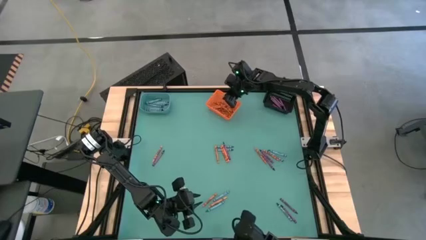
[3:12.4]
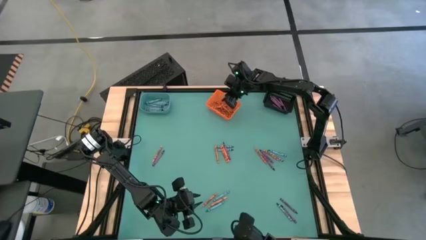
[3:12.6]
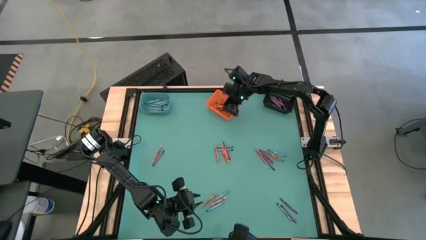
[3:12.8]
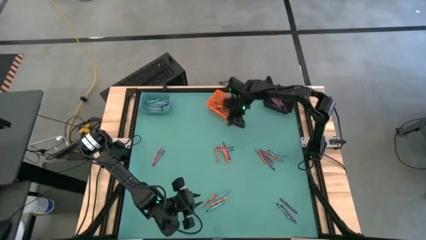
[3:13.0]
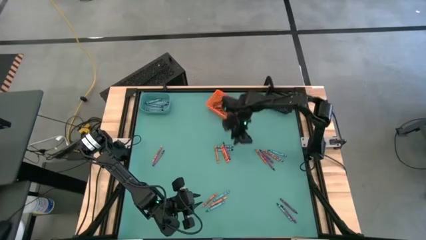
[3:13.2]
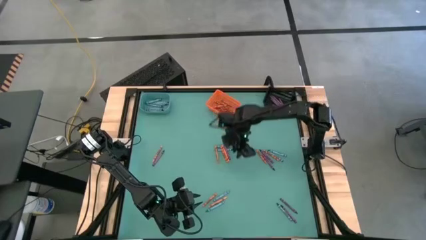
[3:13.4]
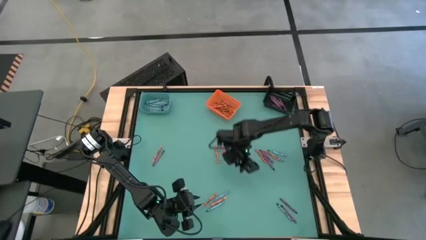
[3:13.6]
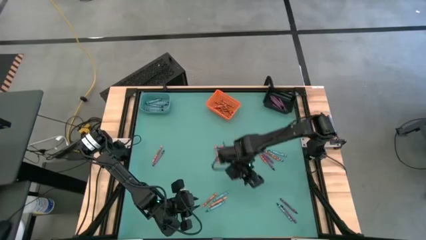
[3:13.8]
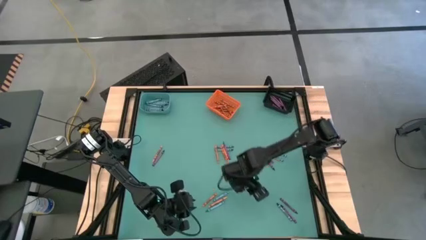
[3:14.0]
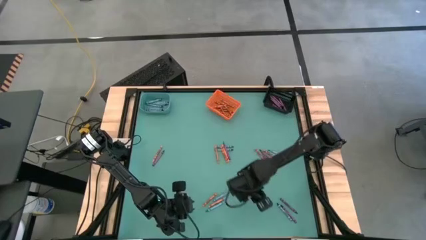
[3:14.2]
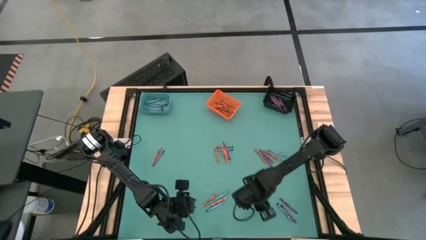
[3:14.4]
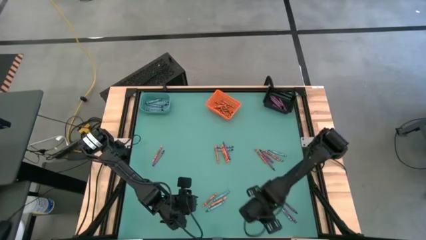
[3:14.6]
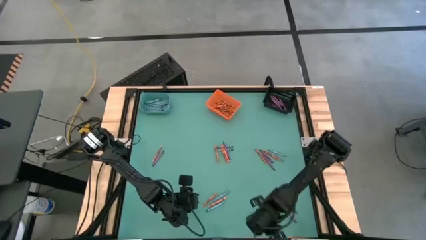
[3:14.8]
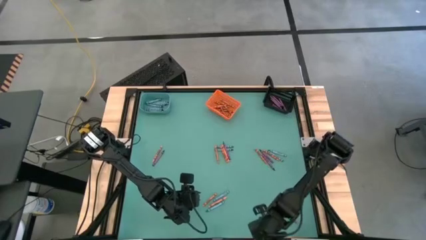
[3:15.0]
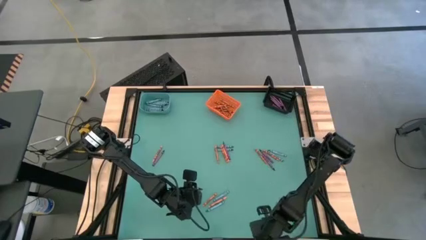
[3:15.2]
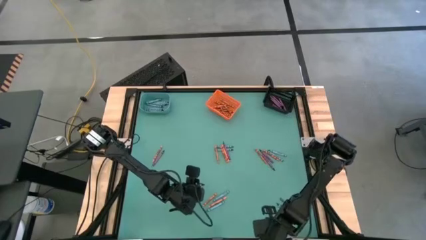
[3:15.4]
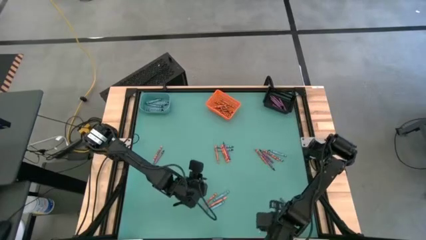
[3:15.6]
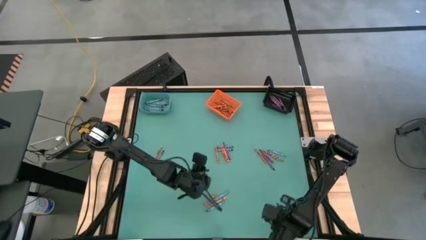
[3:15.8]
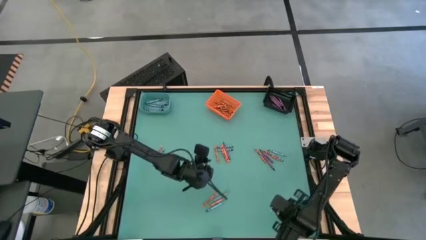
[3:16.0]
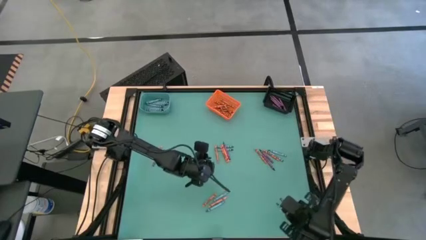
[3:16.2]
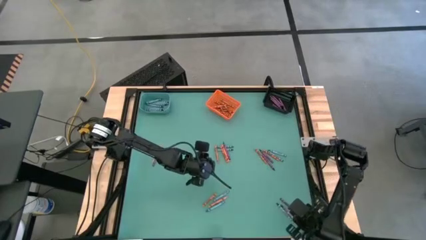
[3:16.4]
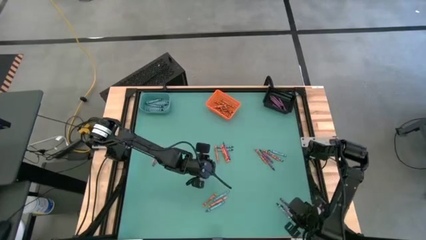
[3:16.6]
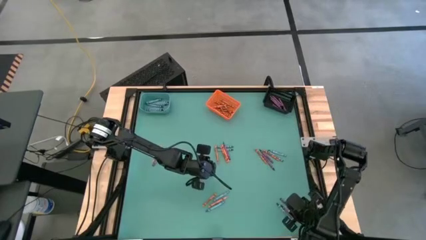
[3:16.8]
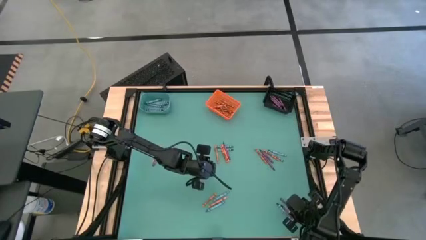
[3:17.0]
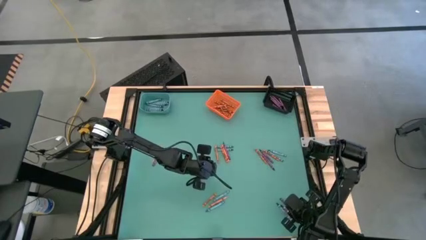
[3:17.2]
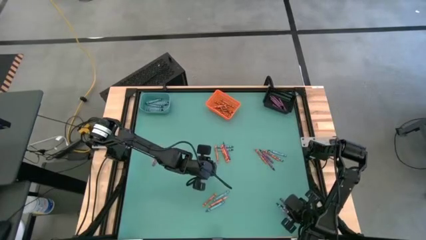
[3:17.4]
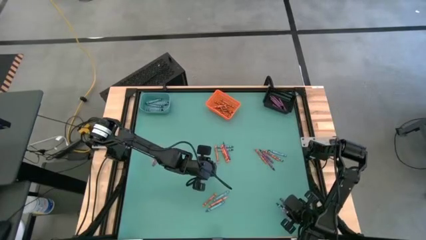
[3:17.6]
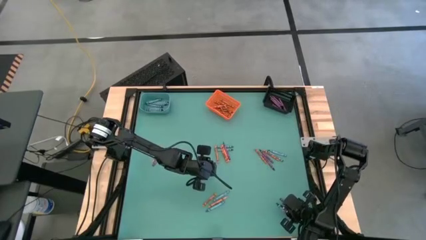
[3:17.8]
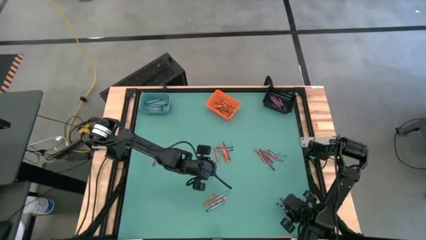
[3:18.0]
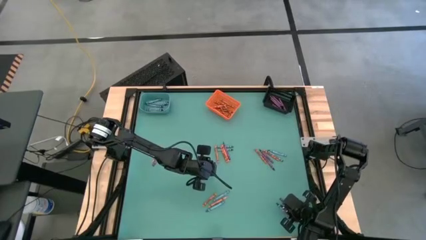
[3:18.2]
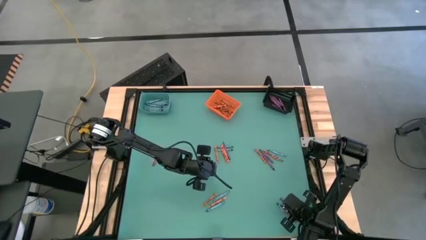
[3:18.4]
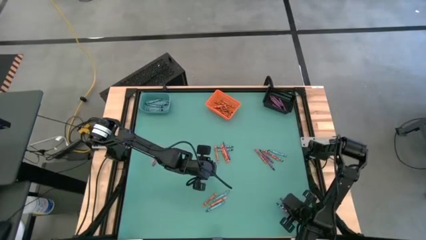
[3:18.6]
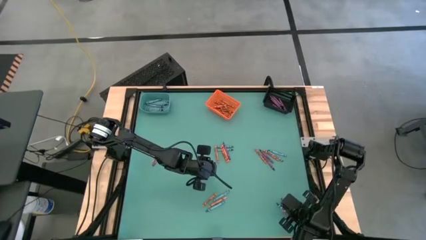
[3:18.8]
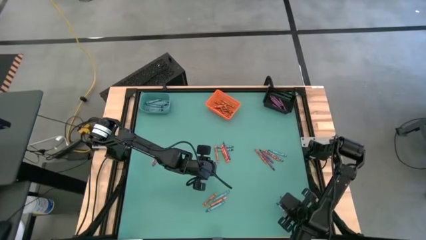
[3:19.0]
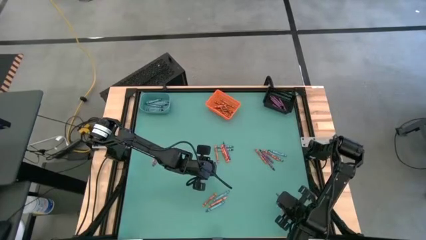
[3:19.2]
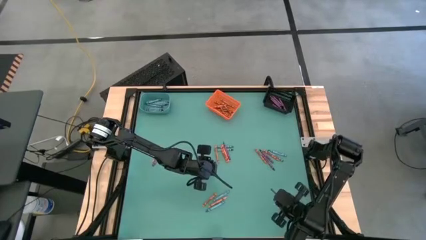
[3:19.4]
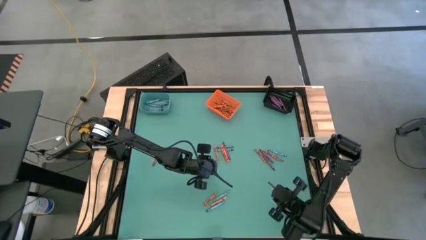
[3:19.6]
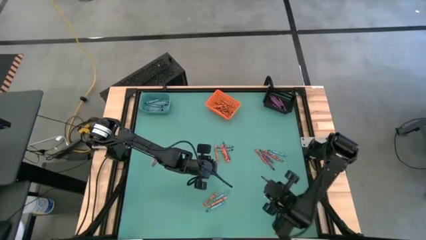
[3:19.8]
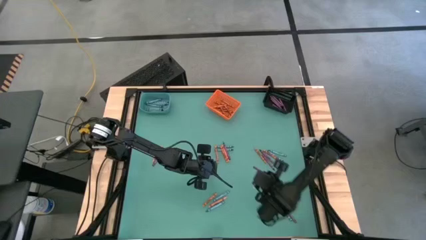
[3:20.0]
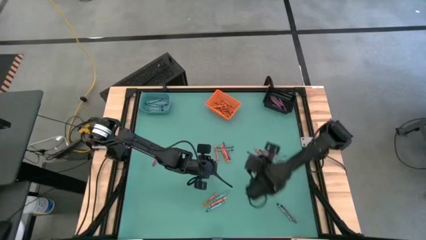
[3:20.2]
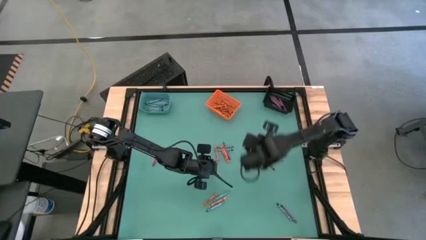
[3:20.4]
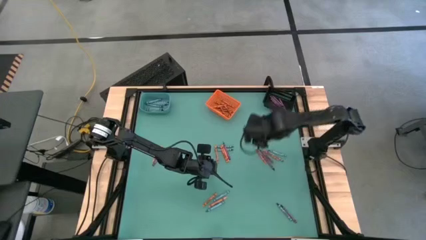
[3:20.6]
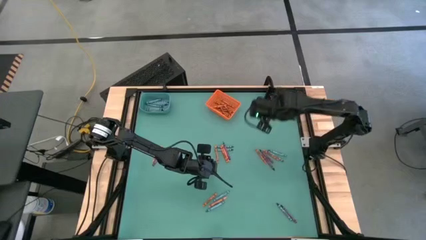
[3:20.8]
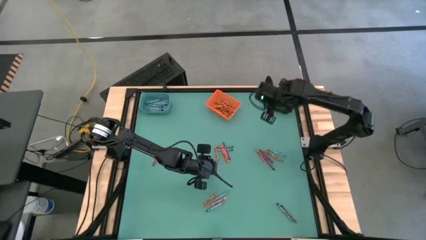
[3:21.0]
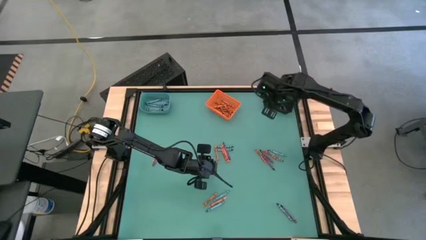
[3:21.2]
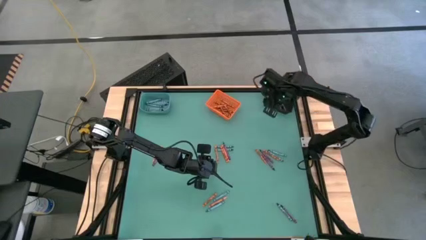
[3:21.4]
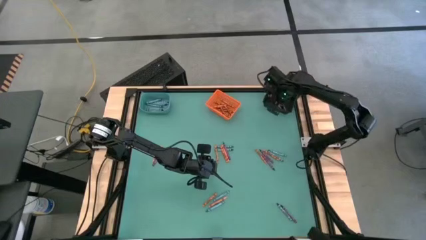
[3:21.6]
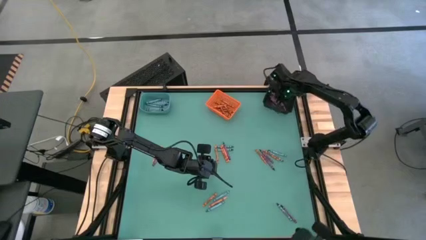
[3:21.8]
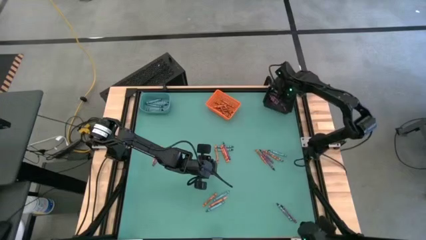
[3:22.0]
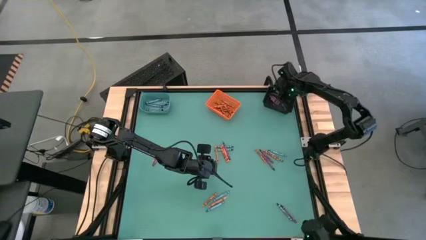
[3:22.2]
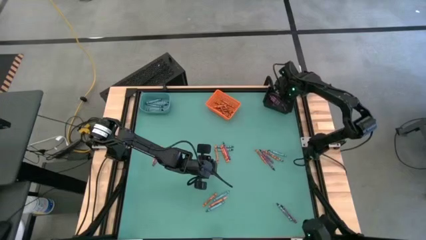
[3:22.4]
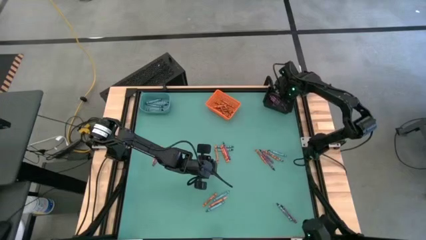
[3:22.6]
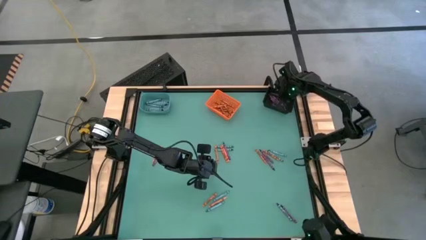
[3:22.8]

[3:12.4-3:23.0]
Task: Sort crayons
Put the violet crayon into the black bin

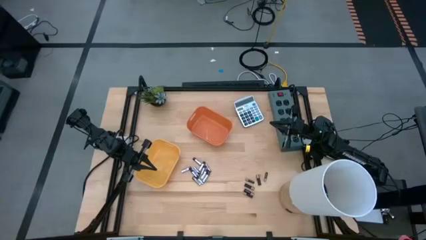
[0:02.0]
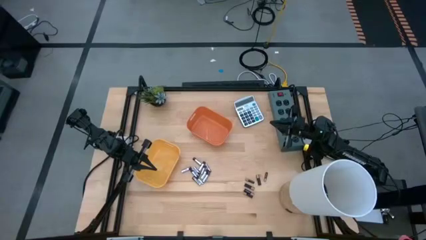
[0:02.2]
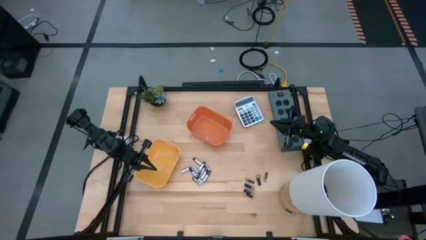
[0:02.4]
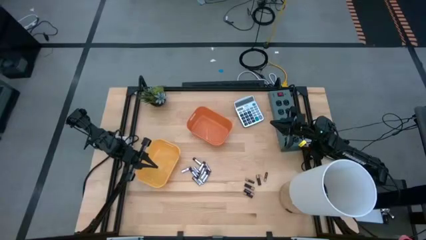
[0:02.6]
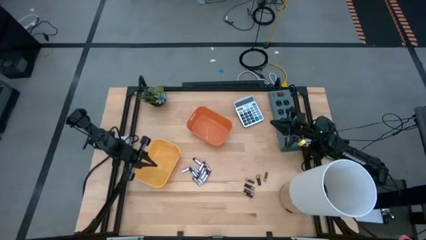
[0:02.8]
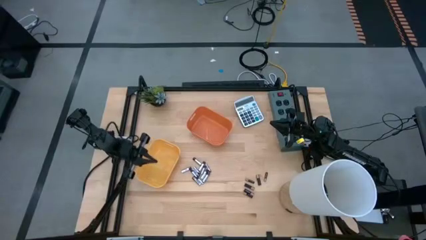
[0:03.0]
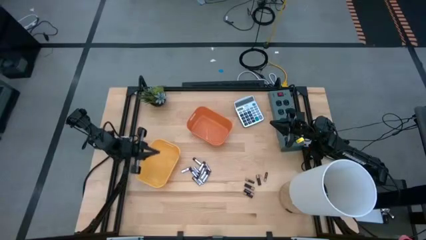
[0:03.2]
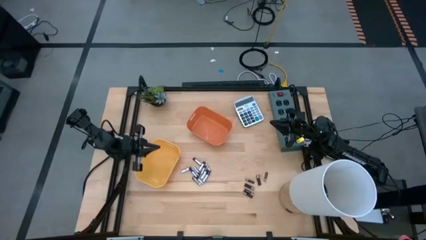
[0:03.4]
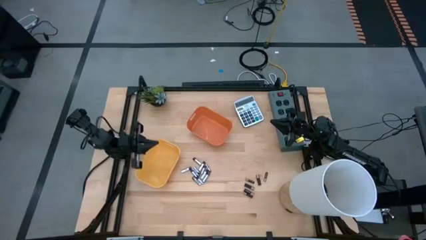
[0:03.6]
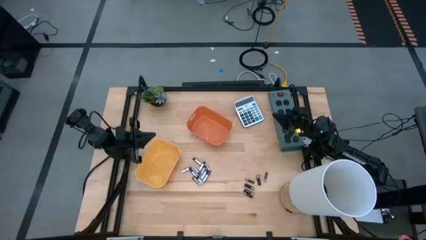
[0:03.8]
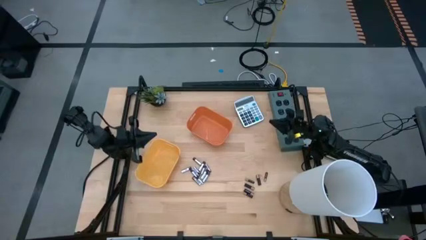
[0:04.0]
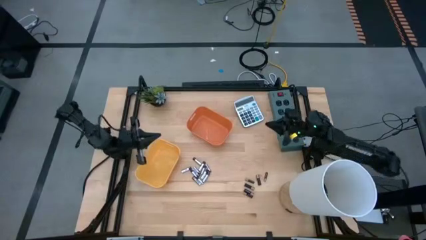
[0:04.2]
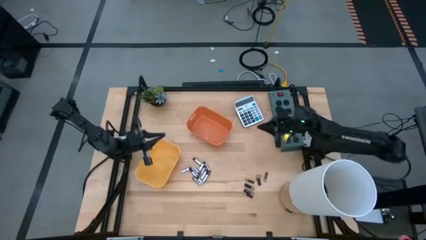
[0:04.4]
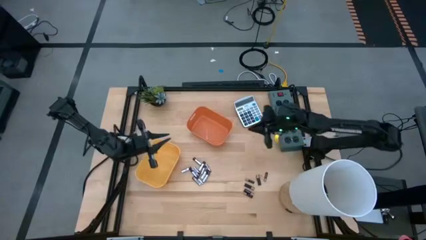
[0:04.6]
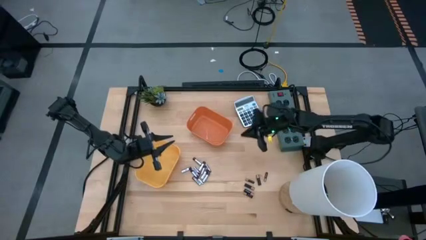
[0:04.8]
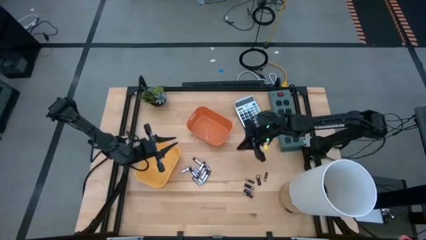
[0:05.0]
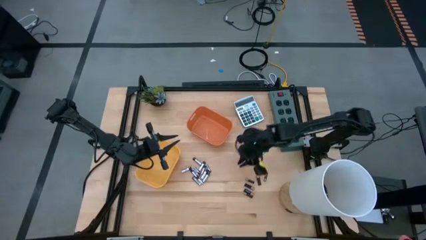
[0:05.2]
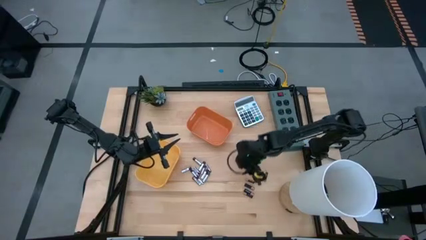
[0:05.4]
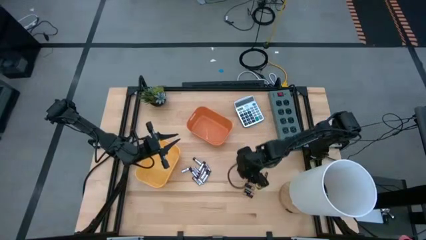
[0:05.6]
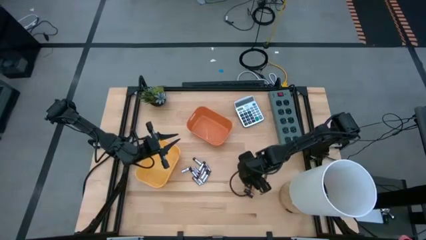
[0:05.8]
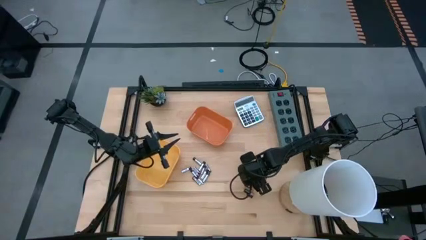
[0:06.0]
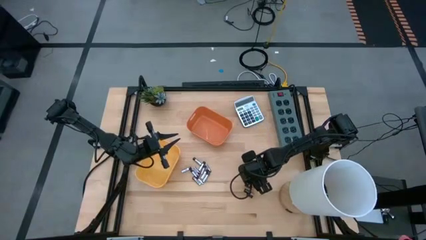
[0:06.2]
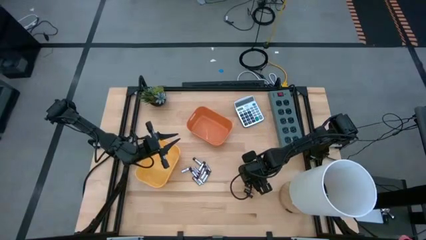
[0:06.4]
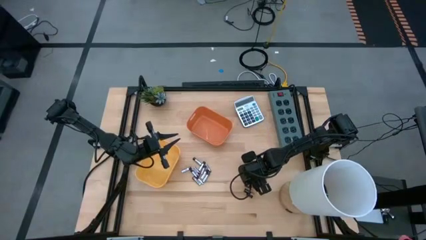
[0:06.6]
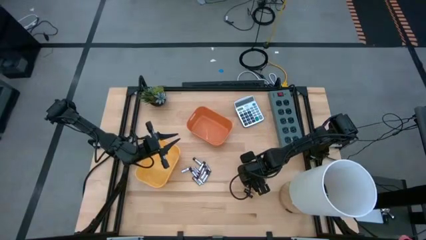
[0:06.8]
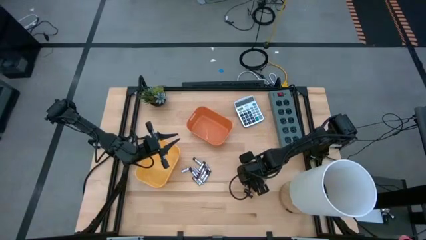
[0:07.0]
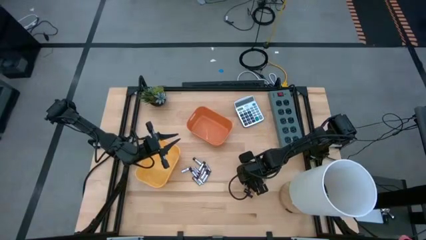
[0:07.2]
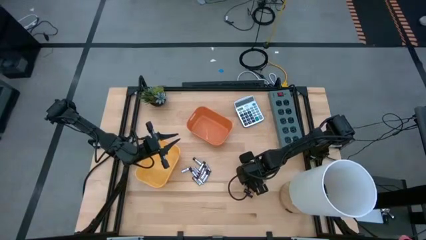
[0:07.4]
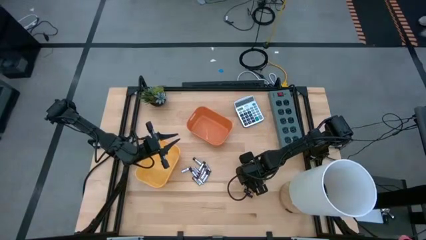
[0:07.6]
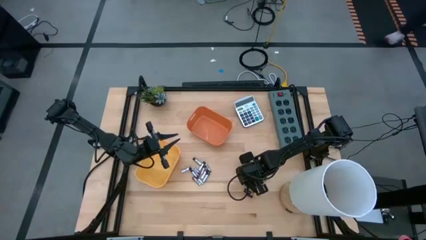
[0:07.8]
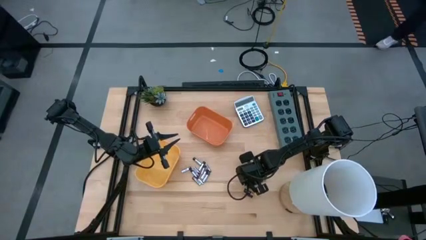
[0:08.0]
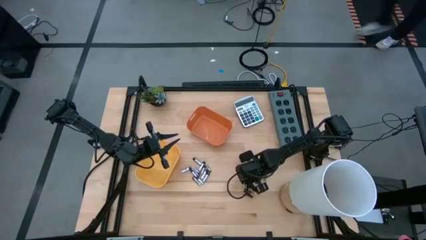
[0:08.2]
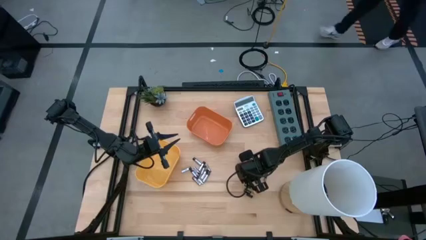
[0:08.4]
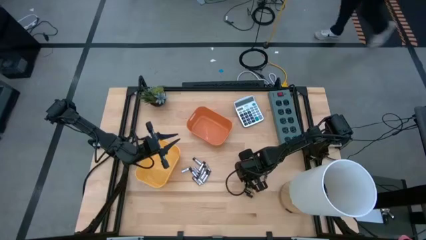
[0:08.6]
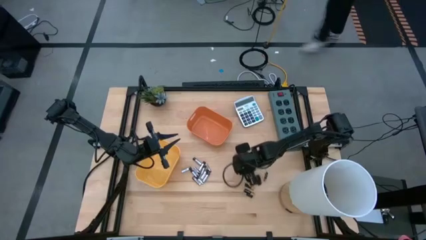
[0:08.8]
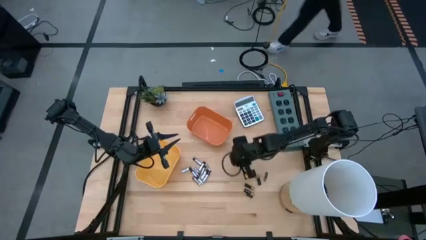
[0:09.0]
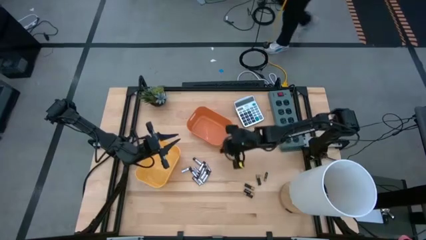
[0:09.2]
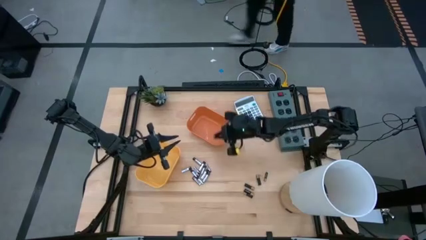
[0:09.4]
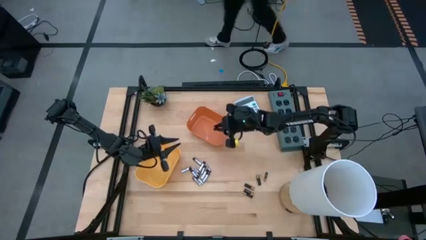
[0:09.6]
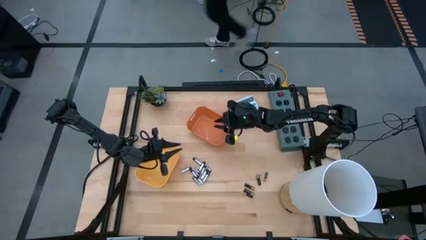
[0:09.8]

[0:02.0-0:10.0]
Task: Sort batteries
Put the black battery into the orange bin
